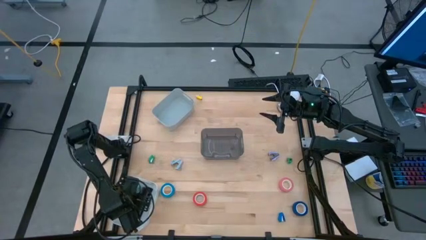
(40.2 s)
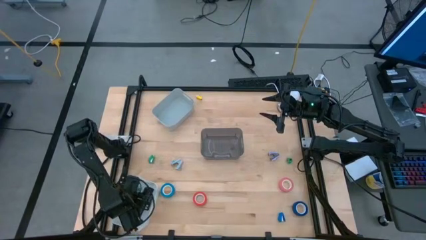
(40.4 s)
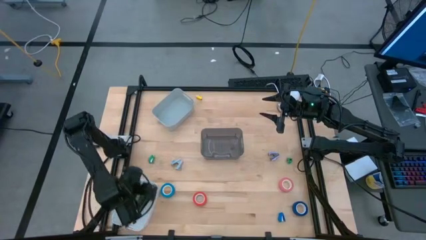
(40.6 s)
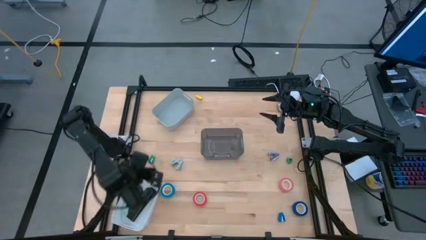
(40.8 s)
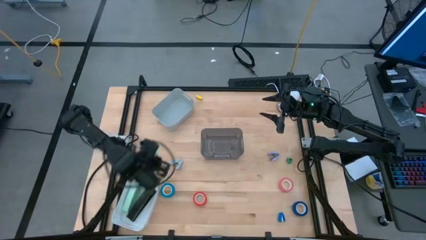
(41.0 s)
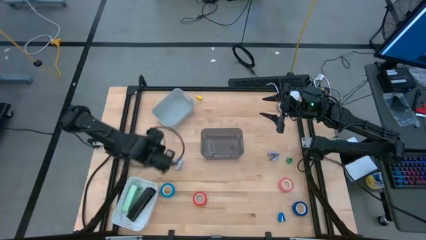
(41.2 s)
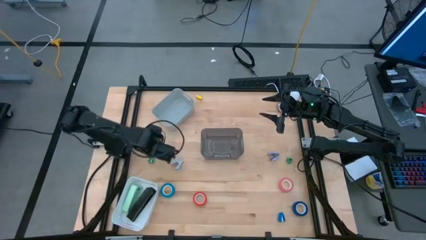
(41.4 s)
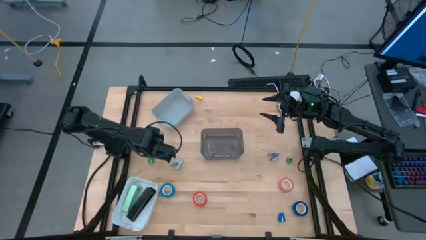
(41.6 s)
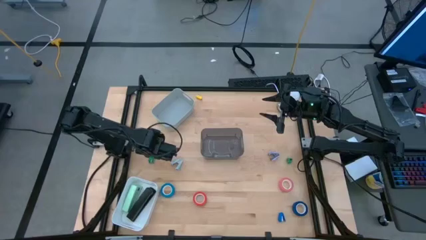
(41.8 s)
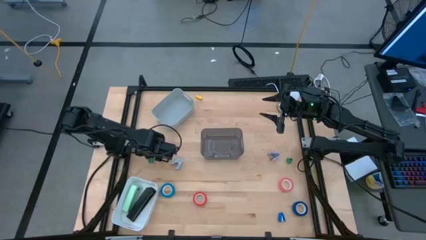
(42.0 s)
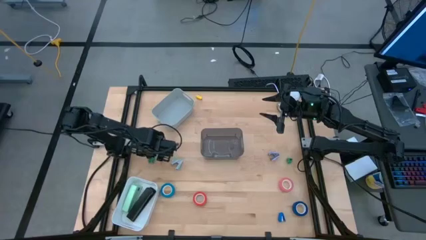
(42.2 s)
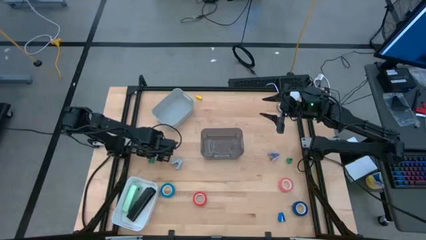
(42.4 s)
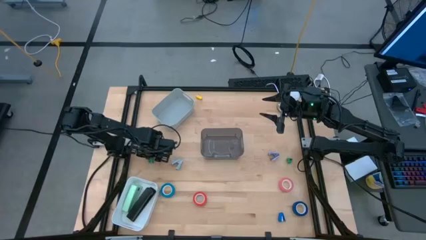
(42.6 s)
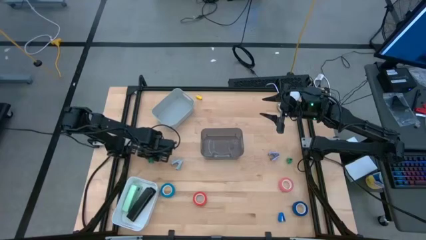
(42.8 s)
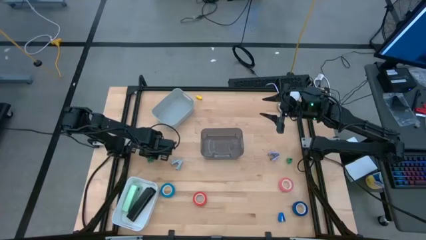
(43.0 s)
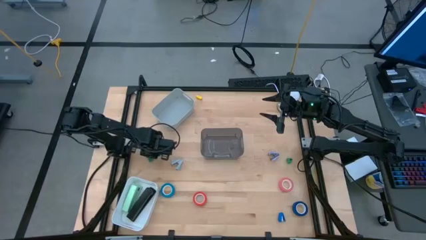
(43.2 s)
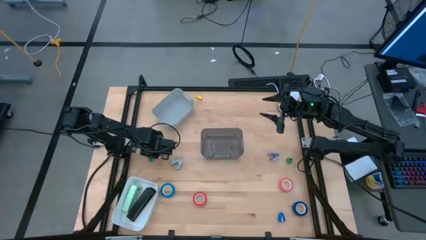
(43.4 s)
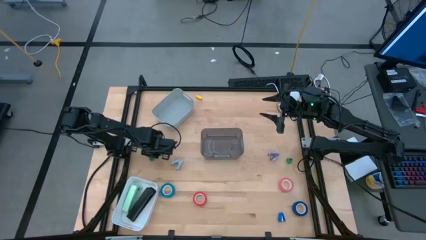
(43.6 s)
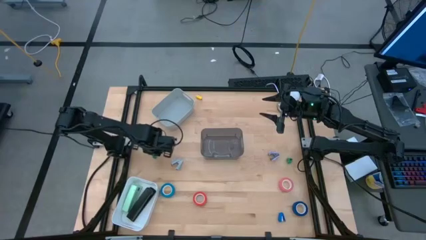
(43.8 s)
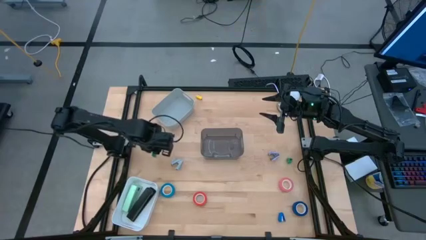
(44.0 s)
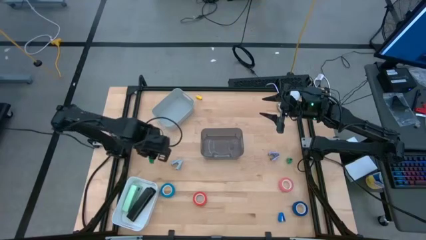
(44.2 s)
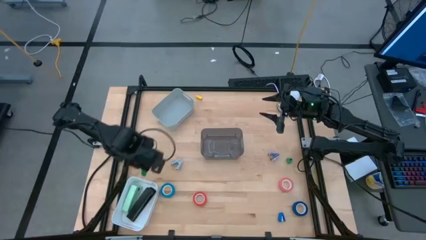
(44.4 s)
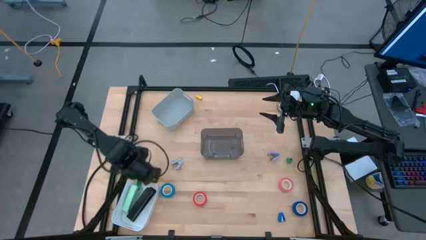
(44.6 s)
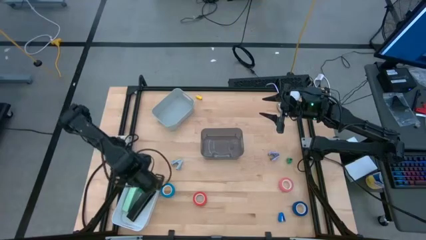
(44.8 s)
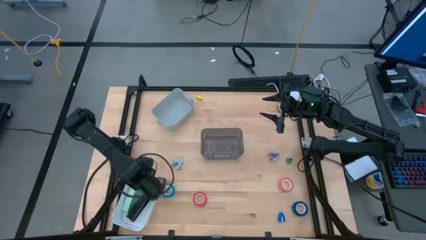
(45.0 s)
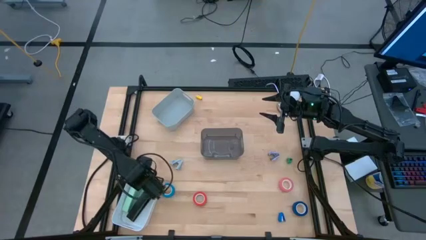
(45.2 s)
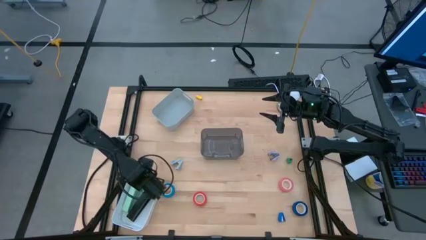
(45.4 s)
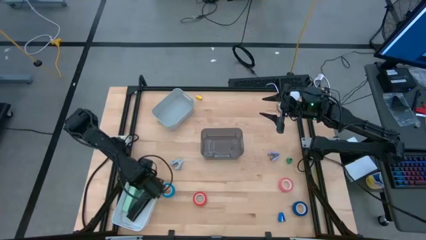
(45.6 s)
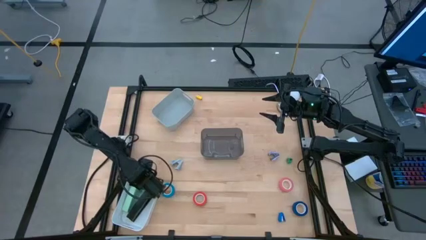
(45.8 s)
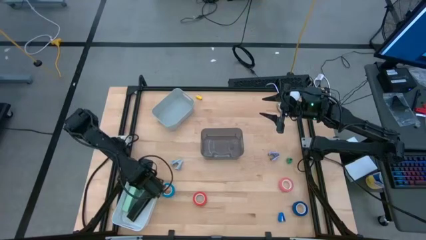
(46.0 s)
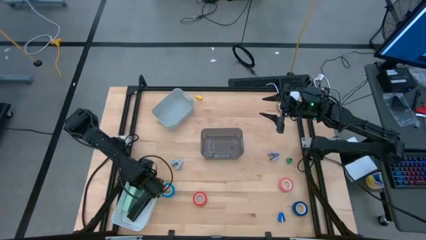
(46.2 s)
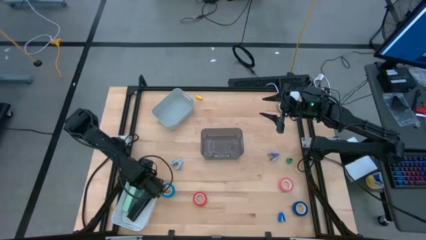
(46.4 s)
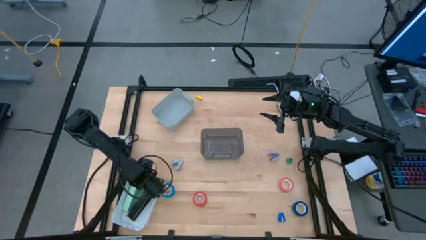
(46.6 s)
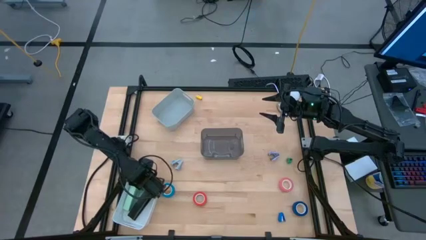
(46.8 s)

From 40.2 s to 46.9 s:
Task: Pick and place Stapler, Stapler remover, tape
Put the left green stapler into the white bin

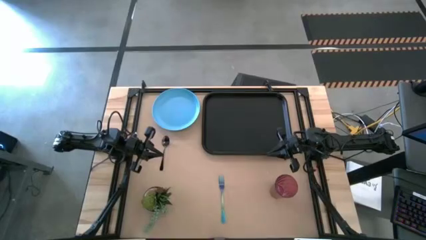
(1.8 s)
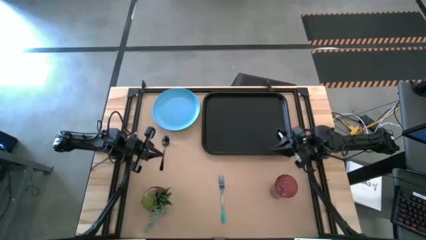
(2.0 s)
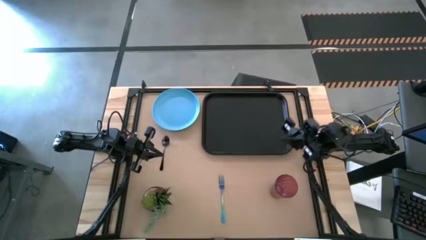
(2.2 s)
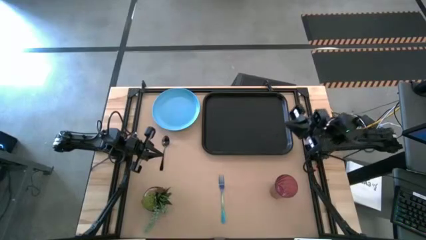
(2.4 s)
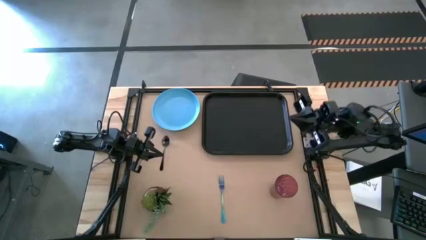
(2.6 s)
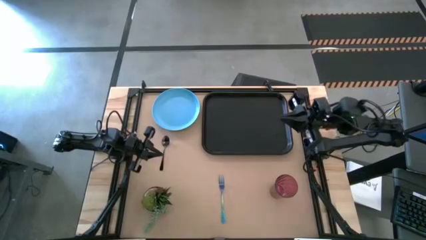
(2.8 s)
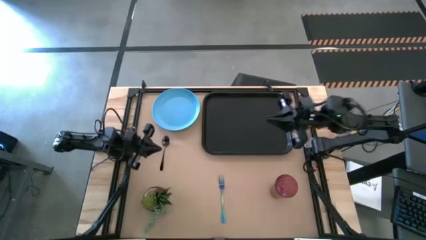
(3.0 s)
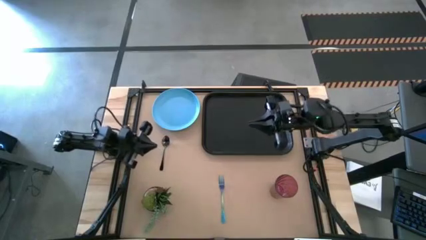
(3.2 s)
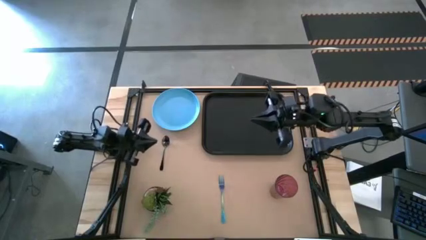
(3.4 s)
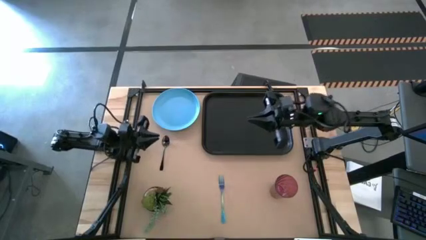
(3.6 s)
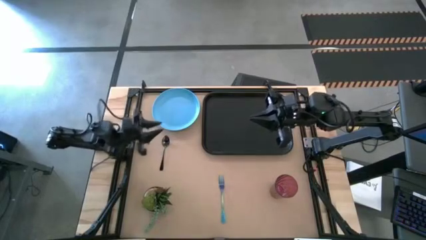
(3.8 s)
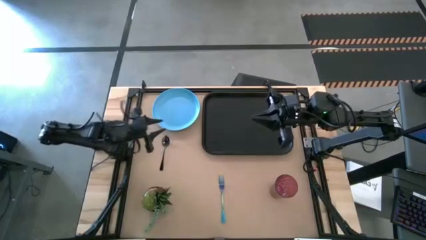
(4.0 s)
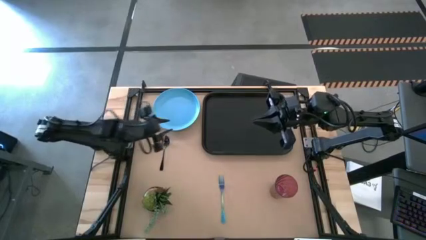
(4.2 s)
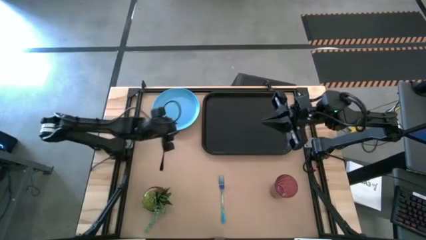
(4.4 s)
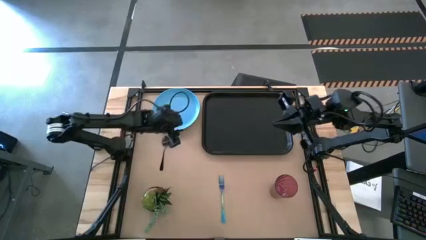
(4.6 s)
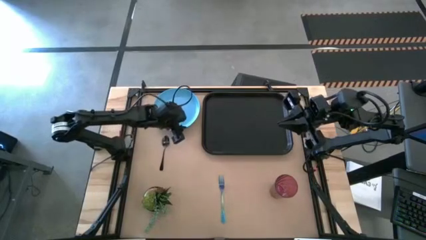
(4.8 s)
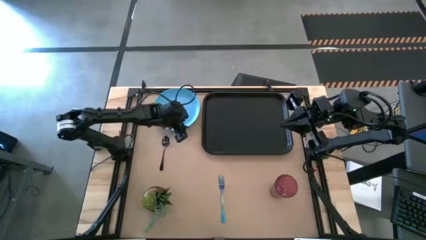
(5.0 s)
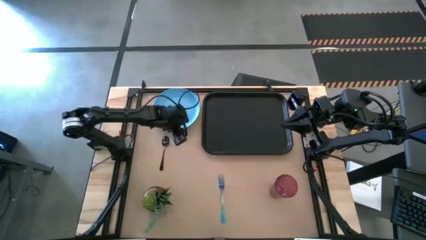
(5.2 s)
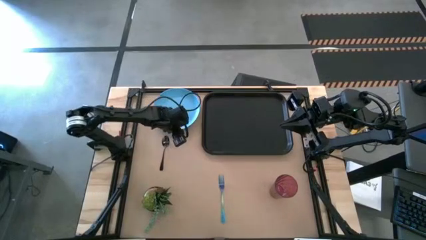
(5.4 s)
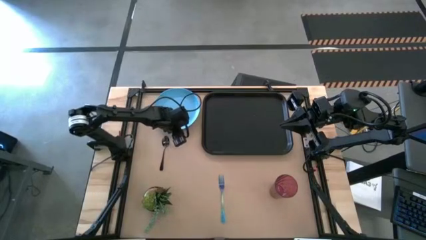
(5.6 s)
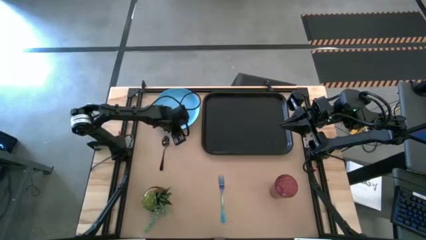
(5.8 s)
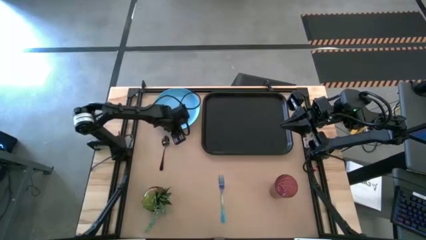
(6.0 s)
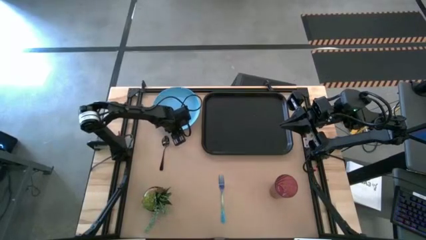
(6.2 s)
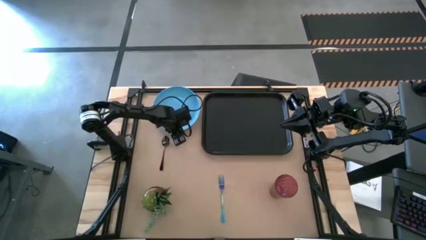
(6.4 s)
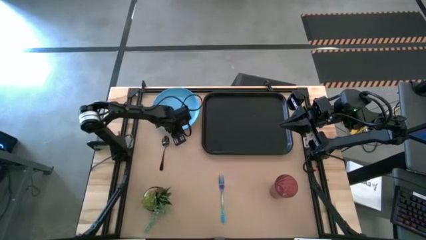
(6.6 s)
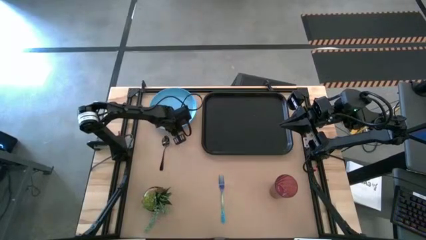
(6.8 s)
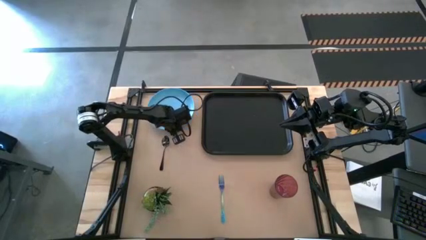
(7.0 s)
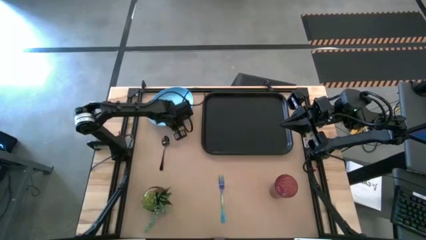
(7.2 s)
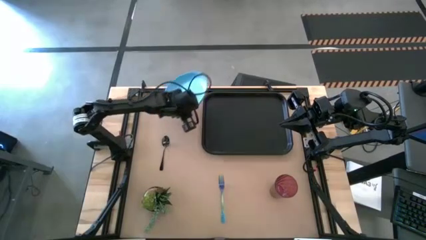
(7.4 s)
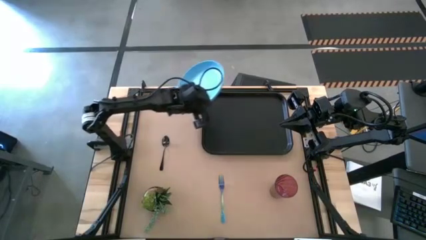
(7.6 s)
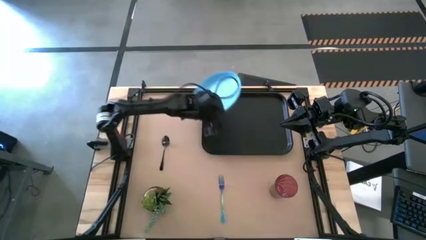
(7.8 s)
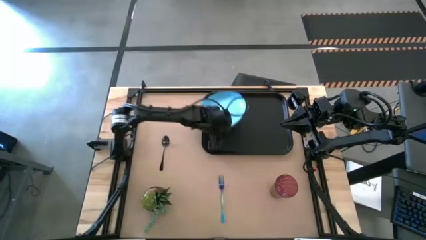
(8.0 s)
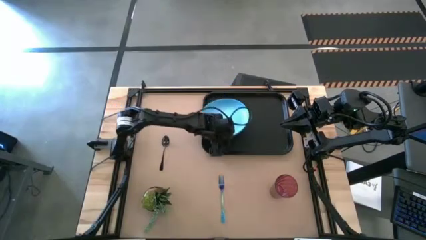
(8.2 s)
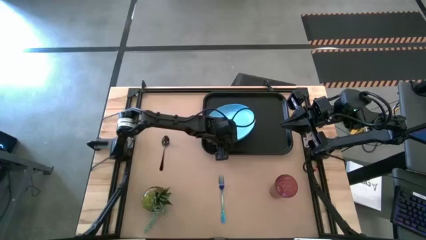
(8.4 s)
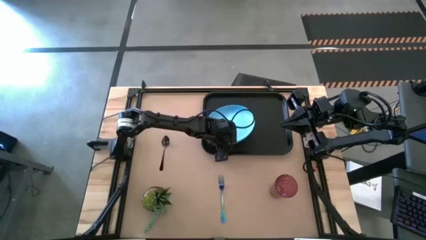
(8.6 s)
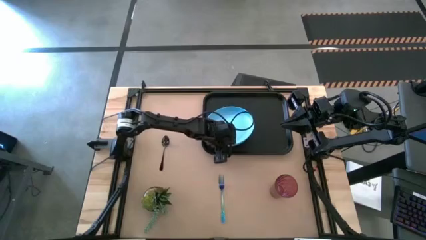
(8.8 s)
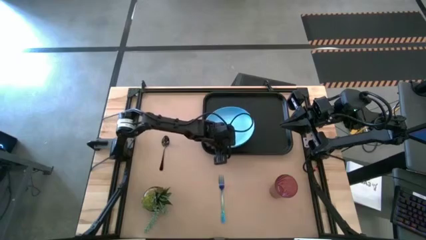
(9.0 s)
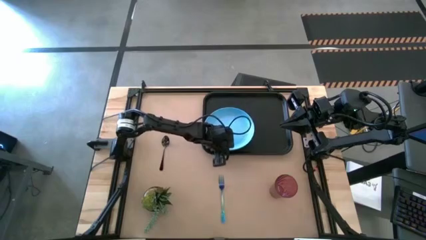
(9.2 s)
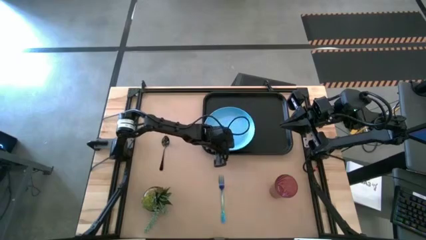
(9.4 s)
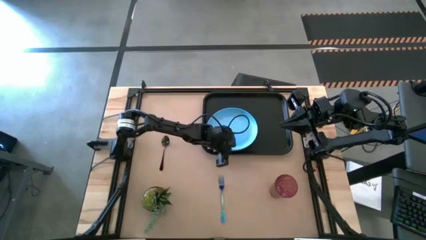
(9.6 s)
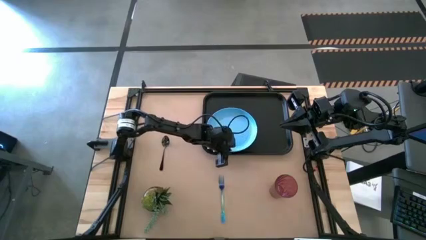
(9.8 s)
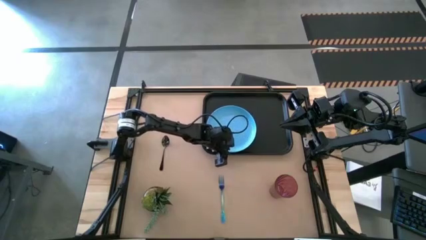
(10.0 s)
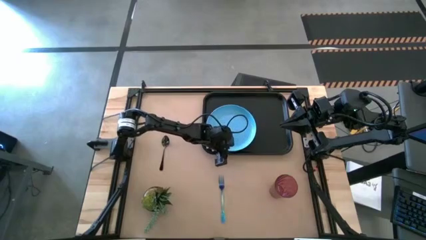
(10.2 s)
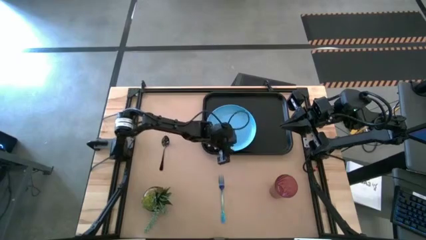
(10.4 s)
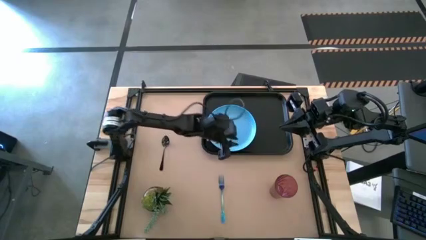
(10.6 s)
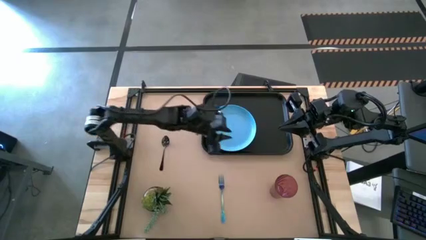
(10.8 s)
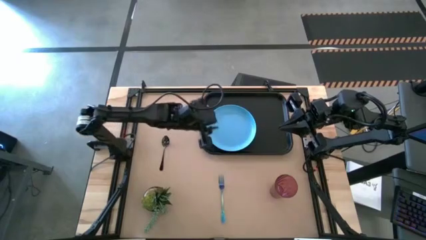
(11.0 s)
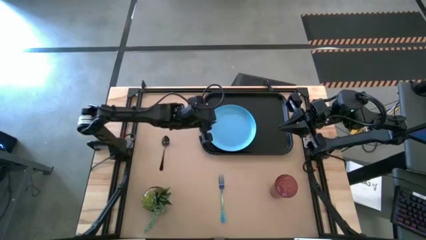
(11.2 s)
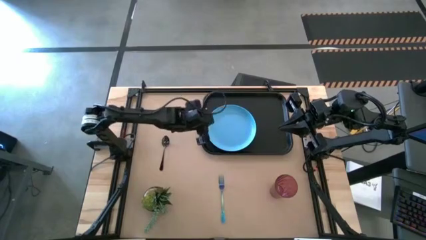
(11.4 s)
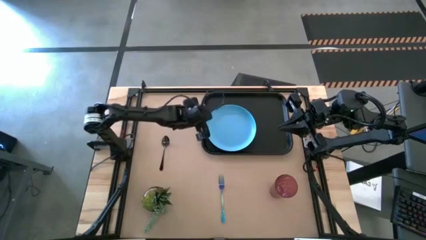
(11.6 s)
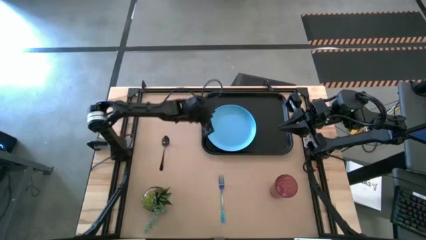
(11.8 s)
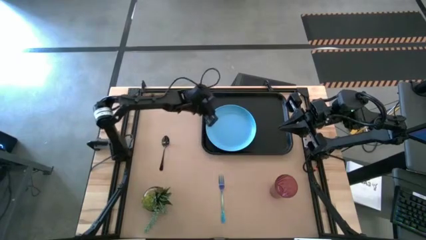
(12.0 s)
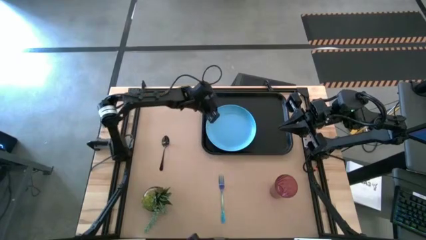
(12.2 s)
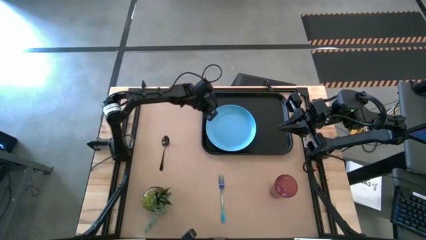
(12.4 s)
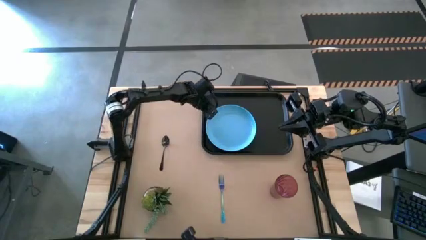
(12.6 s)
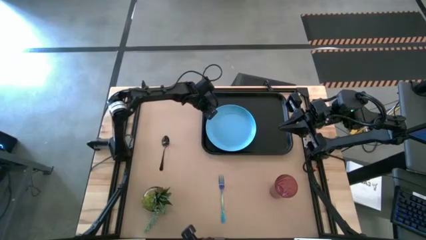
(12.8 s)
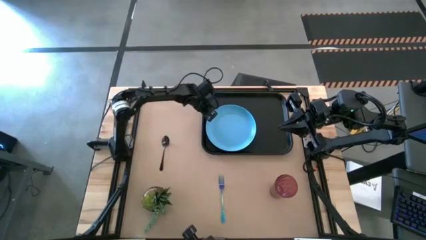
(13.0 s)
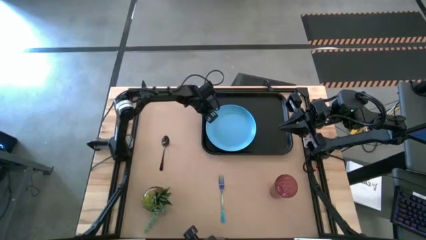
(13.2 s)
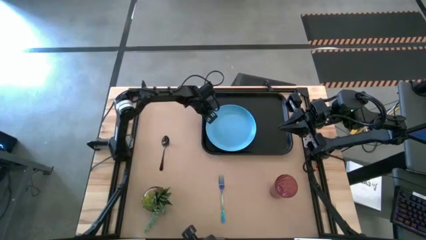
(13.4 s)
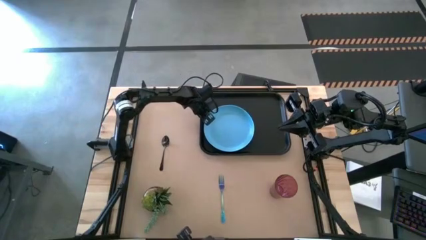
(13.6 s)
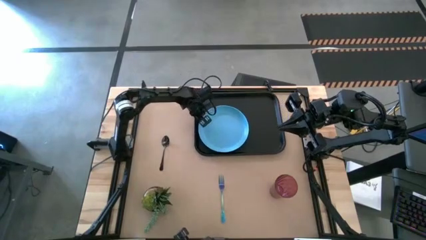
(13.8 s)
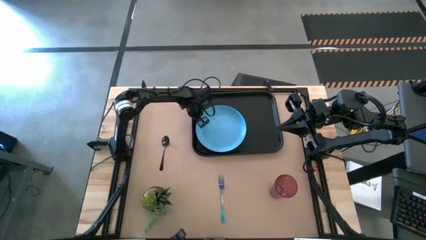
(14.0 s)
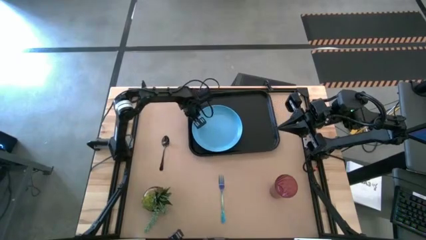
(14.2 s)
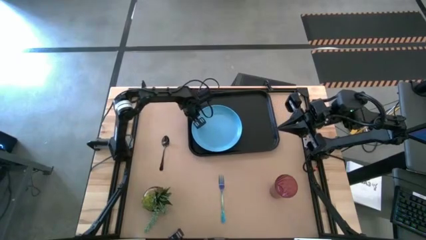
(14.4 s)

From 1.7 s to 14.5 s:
Task: Pick and place plate/cup/fork/spoon on tray
Put the blue plate on the black tray
